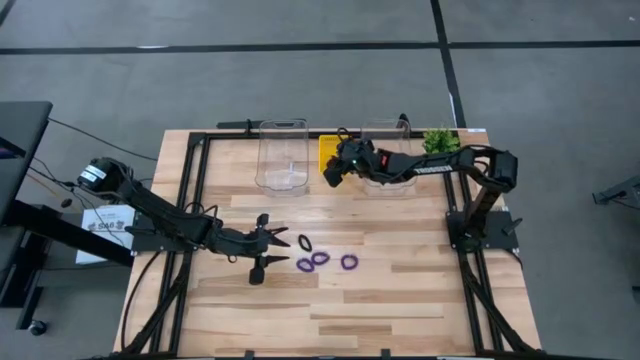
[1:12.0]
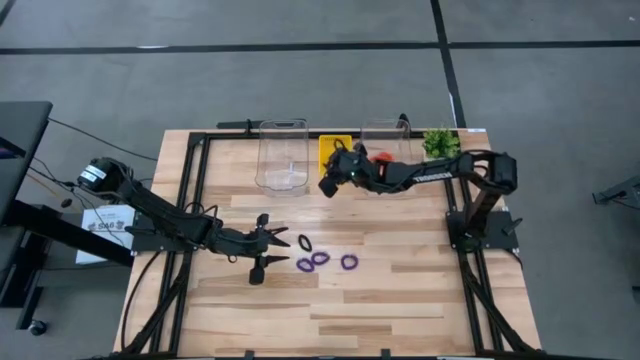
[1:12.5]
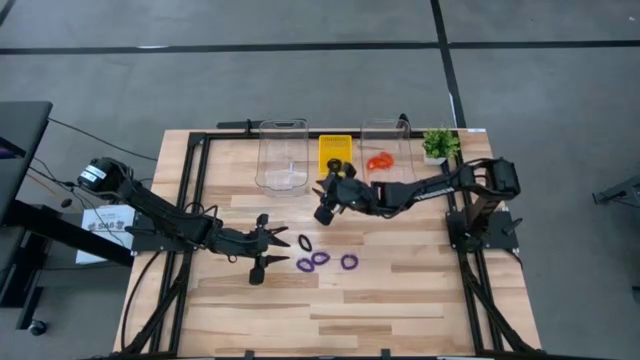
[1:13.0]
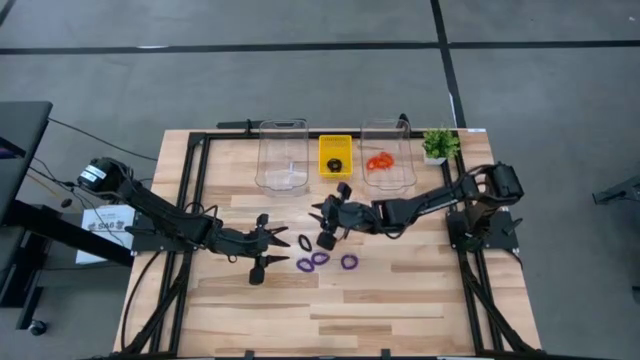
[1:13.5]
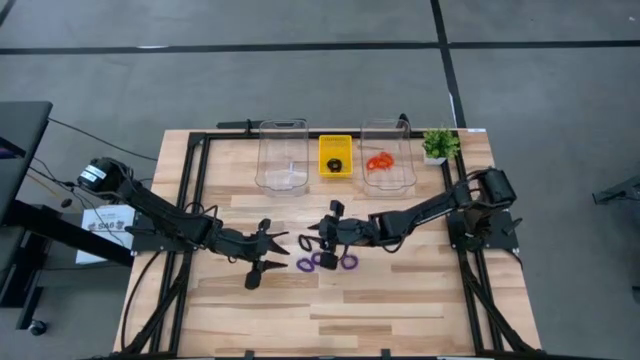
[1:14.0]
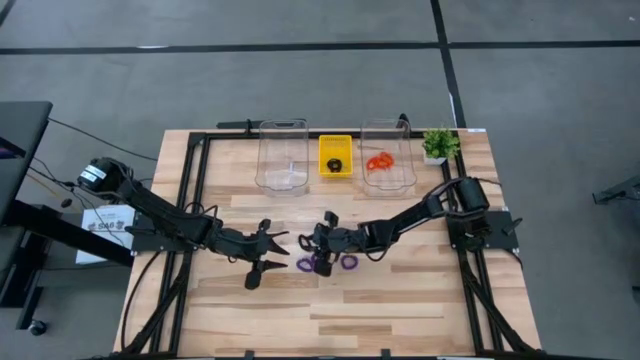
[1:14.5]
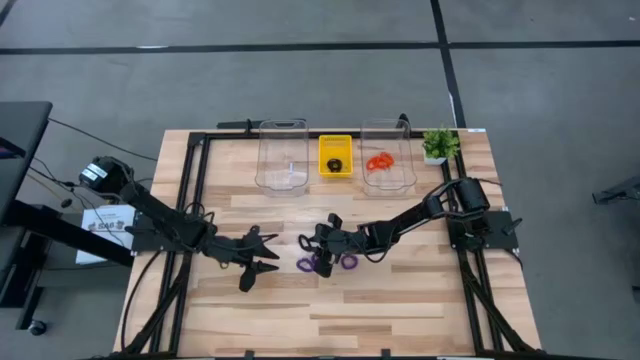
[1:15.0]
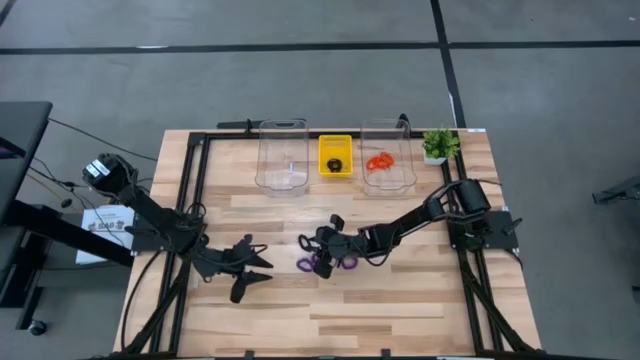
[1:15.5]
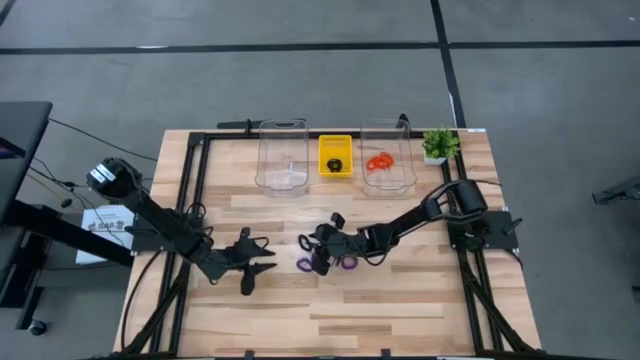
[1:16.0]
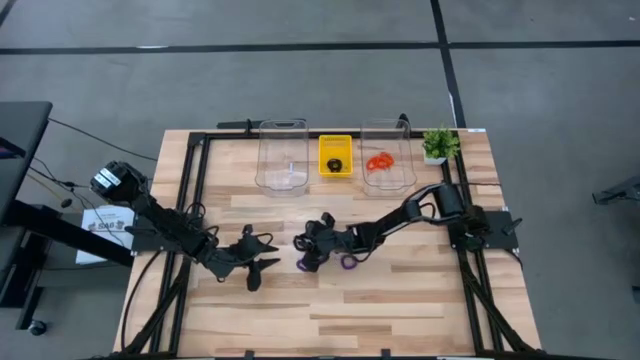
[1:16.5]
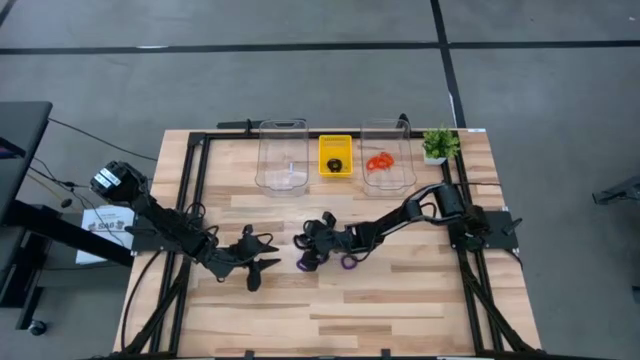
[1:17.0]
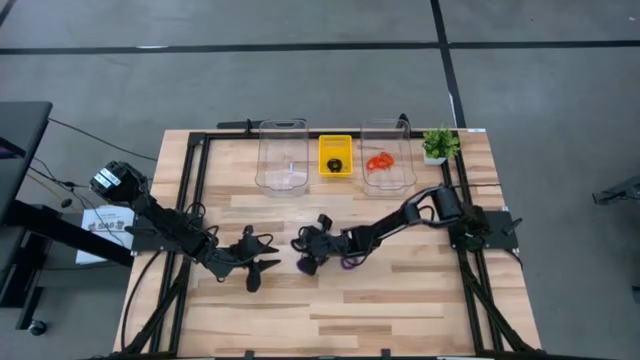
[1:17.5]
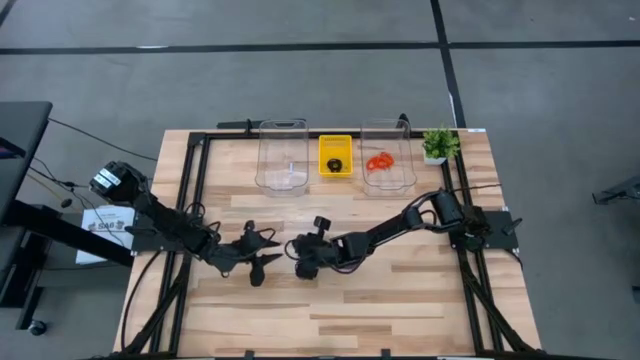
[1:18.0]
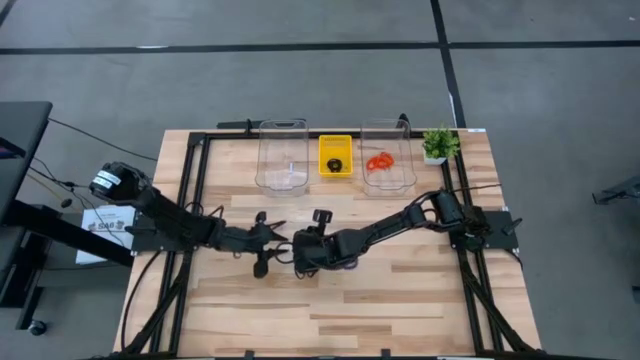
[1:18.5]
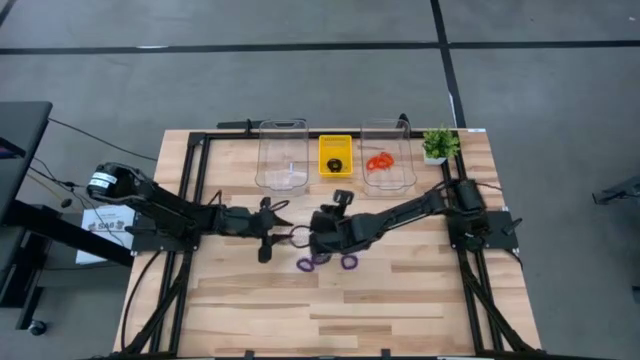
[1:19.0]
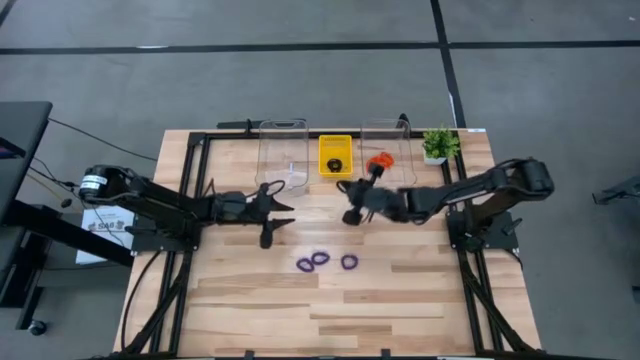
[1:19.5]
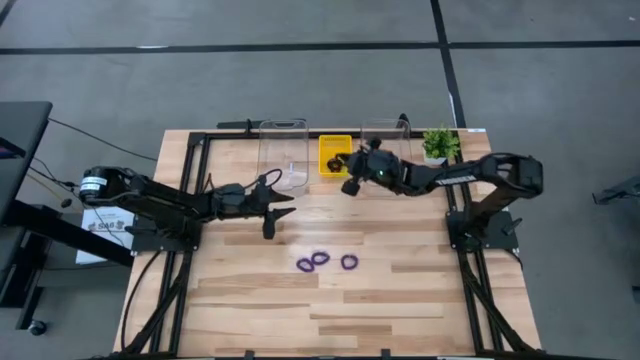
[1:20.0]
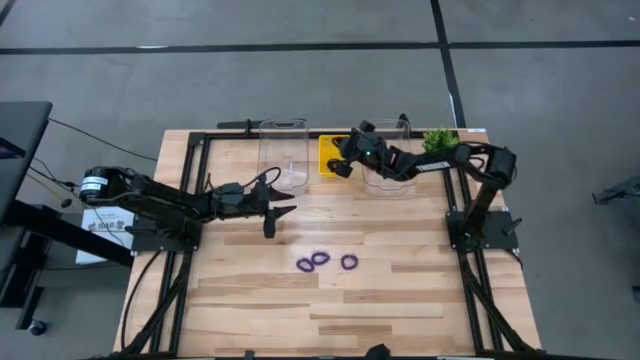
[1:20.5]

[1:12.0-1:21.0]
Task: Sort spring keychains
Put the black spring keychain into the yellow bin

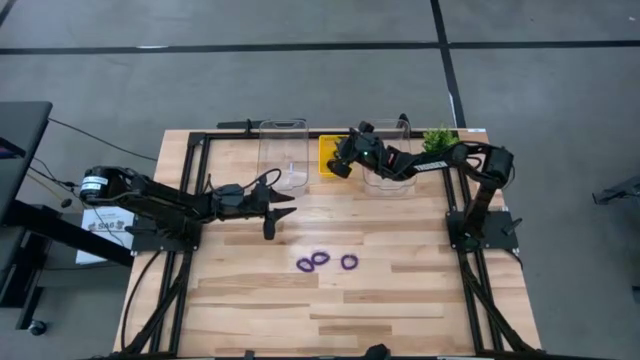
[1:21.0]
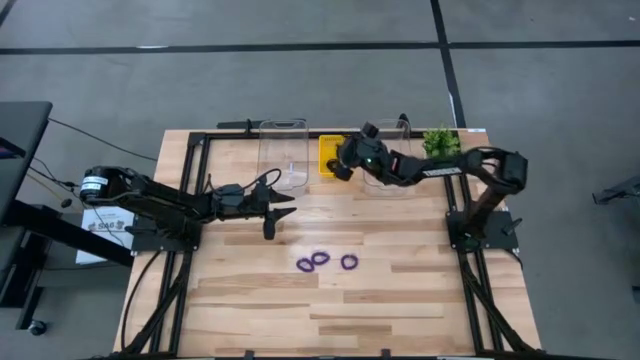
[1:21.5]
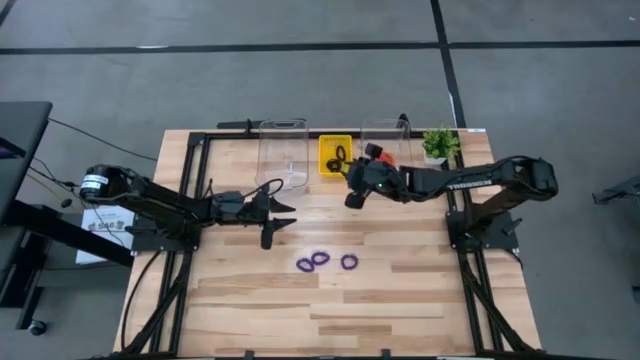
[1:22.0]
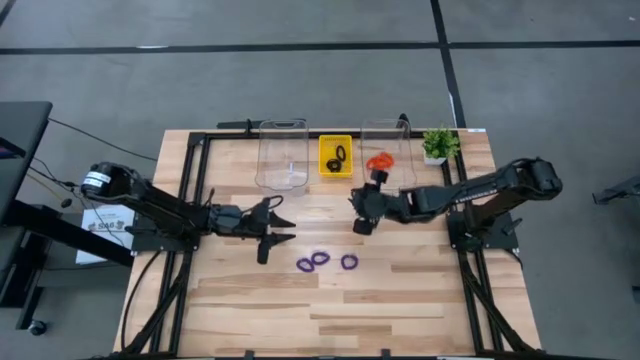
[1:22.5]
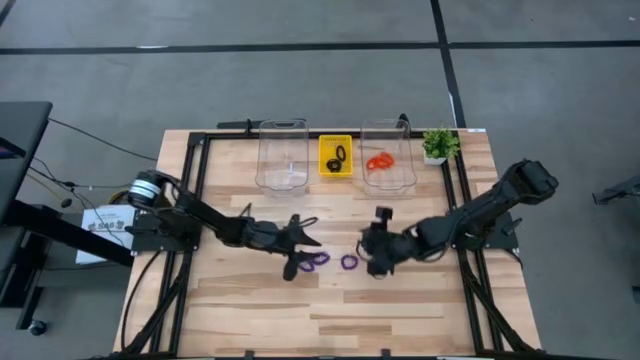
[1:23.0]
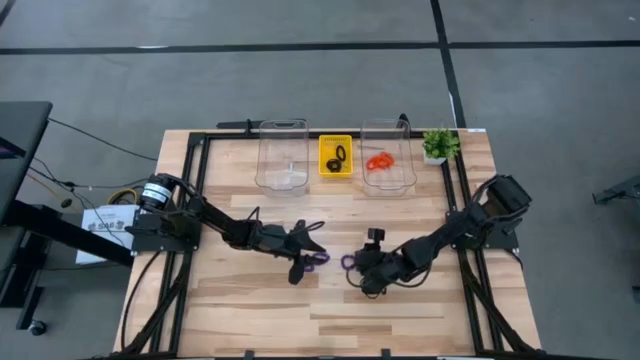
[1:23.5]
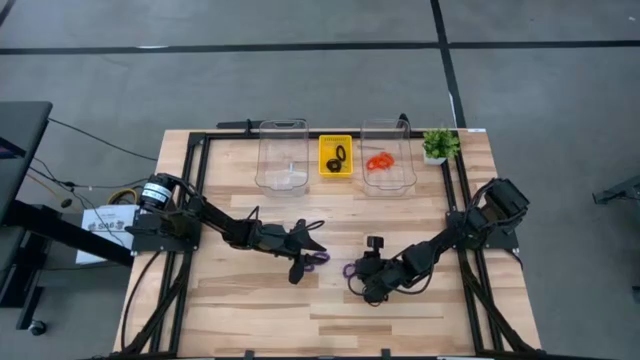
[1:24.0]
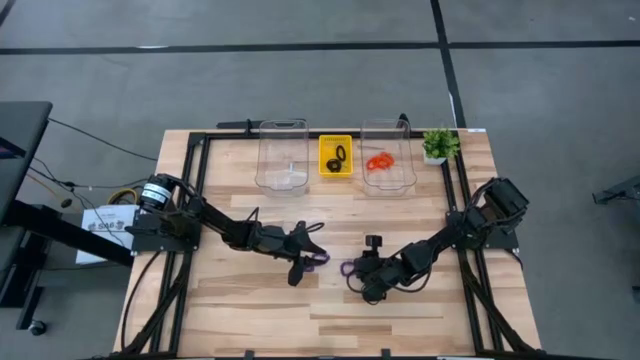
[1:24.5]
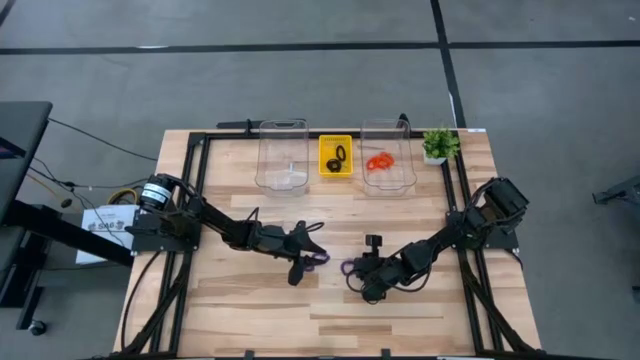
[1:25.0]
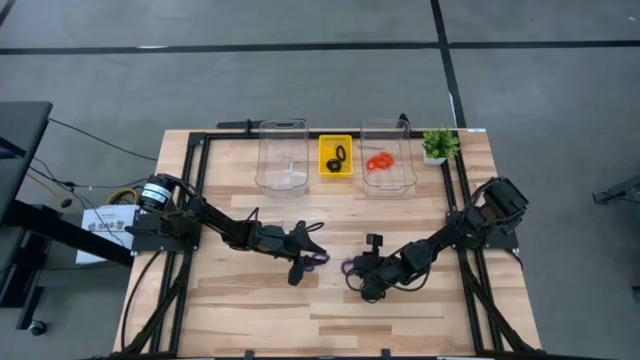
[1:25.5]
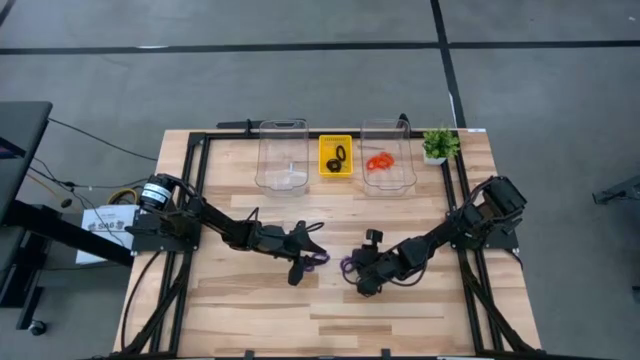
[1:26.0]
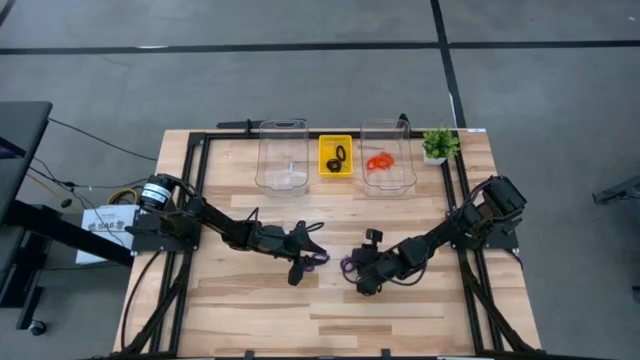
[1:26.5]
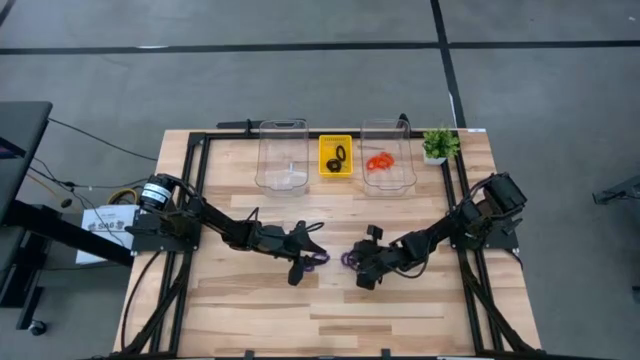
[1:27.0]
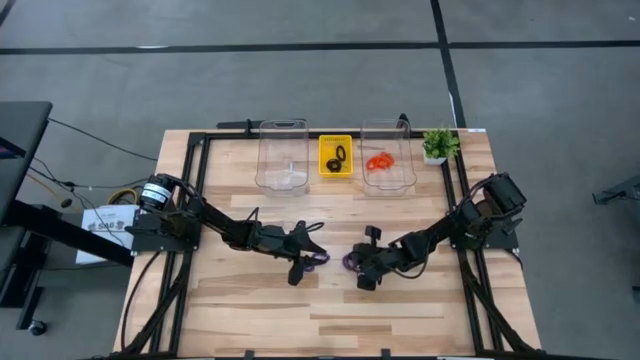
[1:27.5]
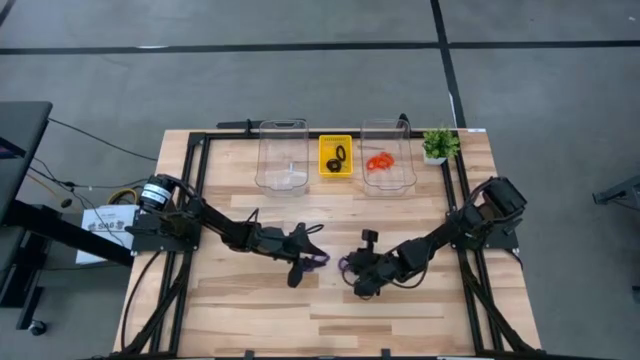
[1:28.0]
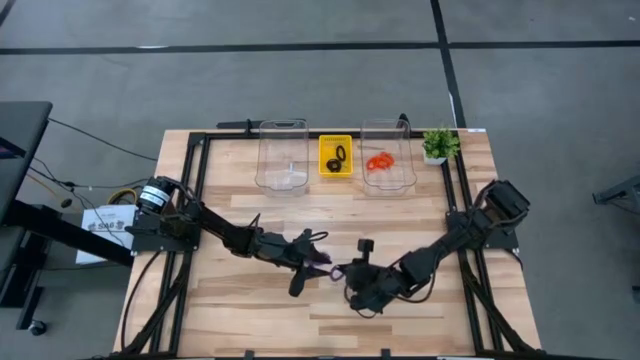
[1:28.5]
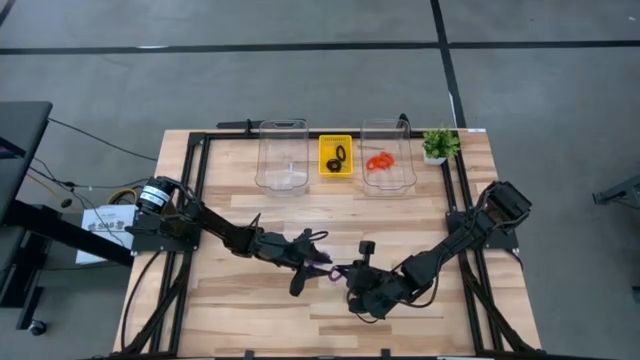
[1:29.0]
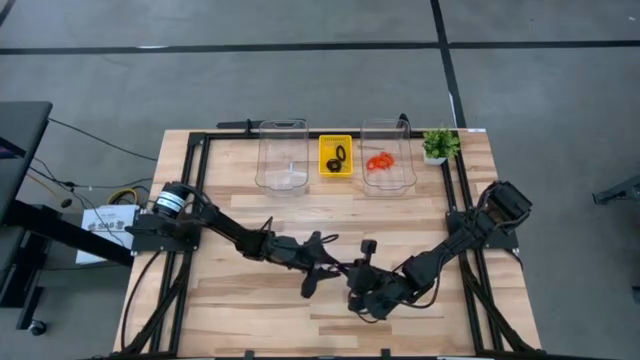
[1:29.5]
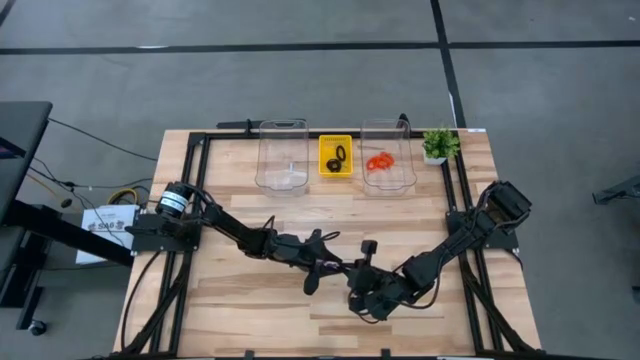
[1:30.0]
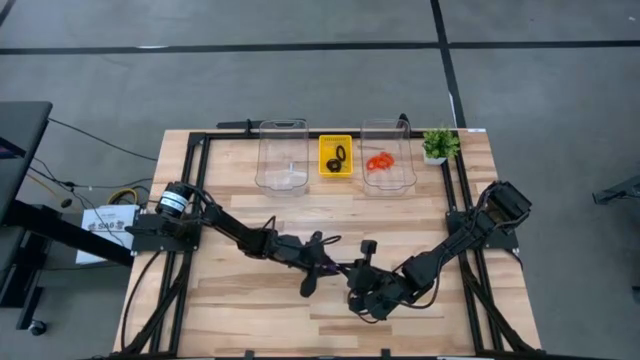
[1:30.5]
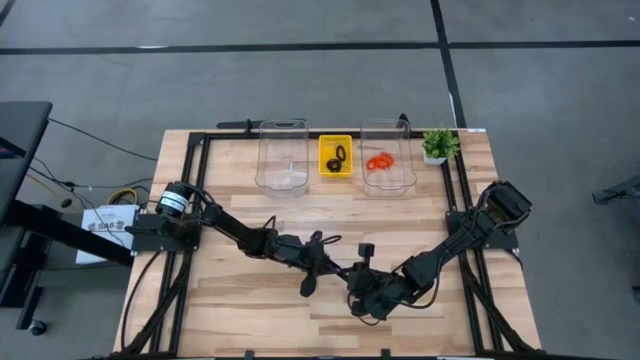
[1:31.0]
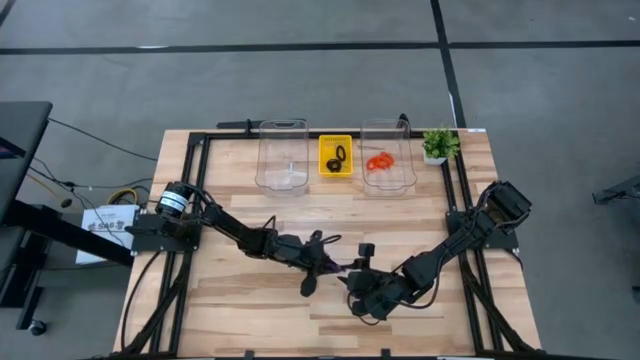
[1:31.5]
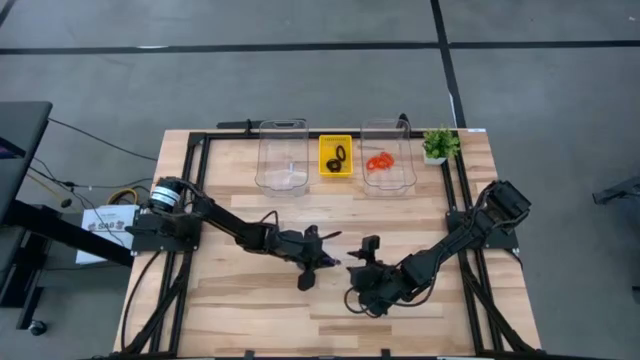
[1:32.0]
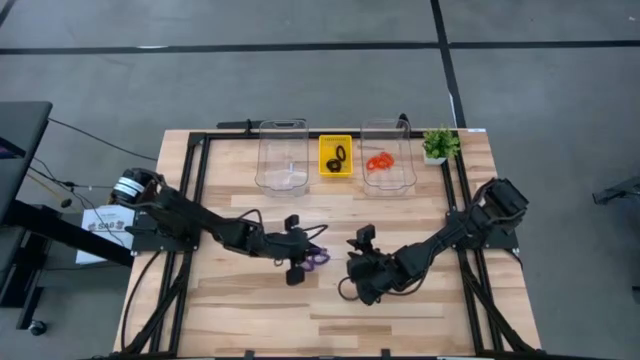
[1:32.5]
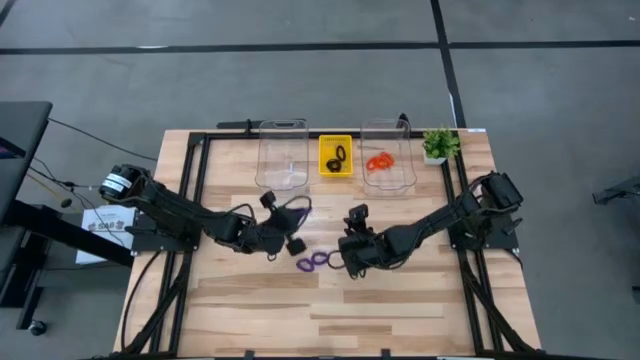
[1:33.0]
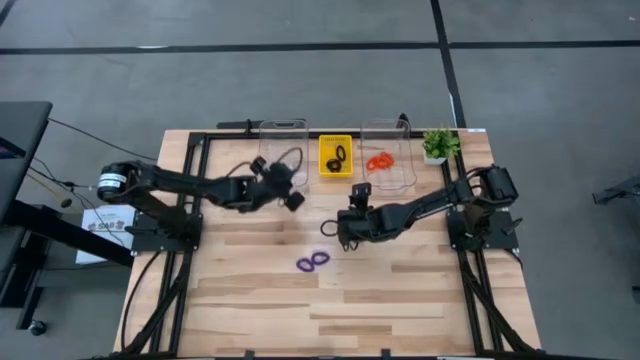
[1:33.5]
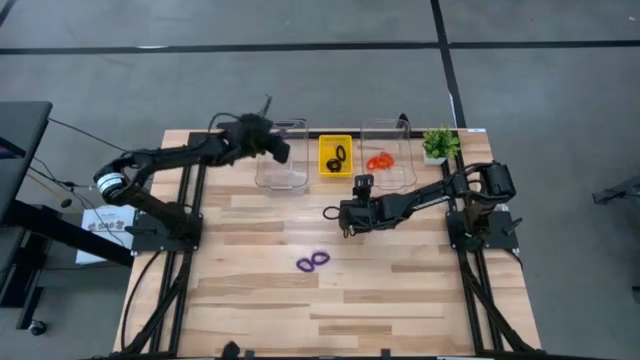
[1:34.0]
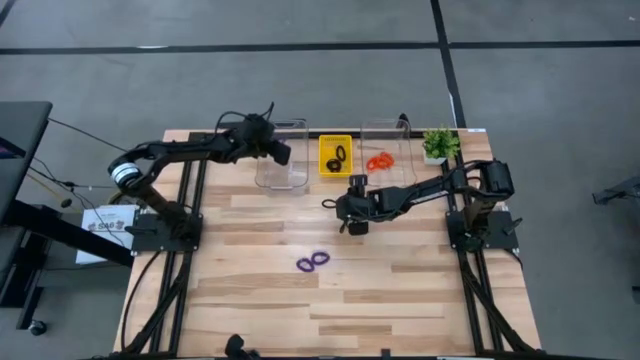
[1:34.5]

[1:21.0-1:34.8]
Put the right purple spring keychain into the left transparent bin

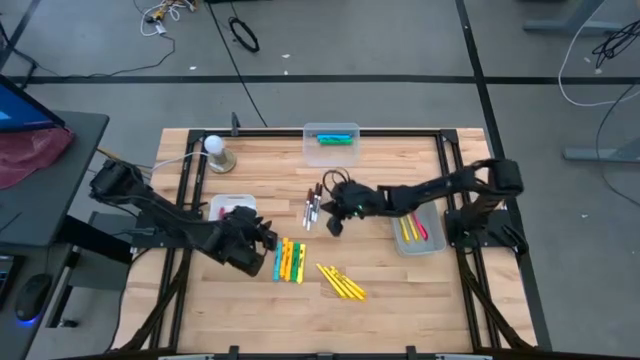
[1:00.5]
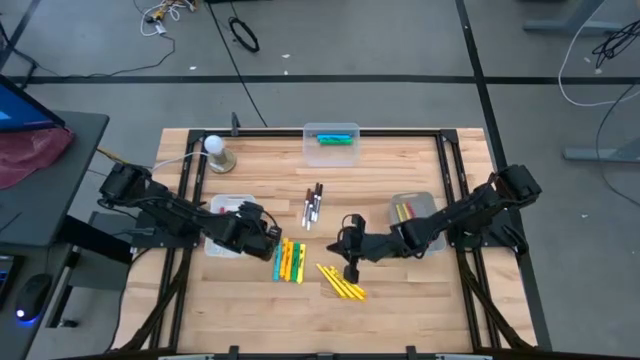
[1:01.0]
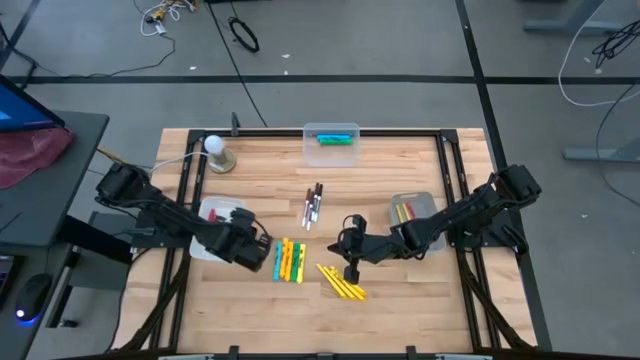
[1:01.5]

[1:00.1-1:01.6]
Task: Pick & Place Markers
Adjust the white bin
